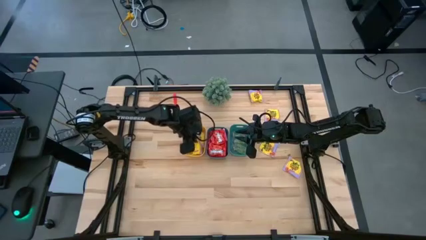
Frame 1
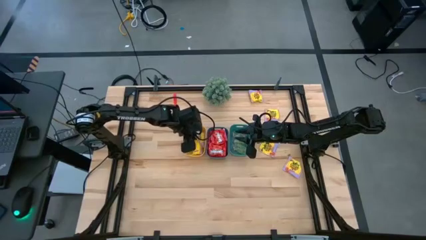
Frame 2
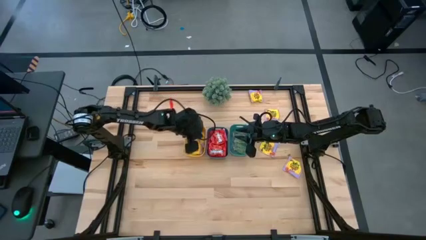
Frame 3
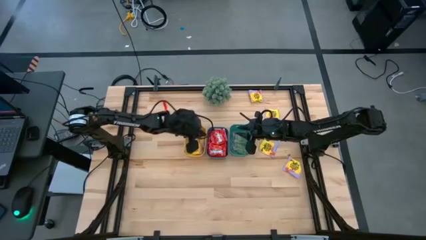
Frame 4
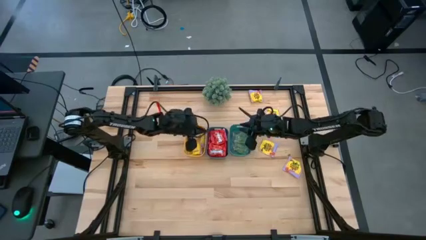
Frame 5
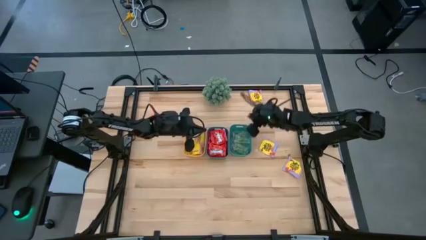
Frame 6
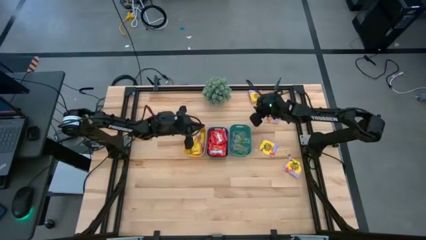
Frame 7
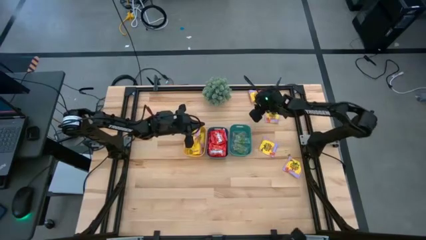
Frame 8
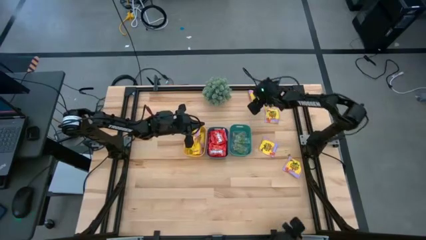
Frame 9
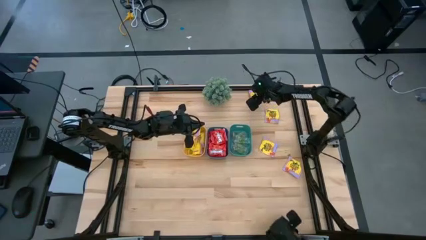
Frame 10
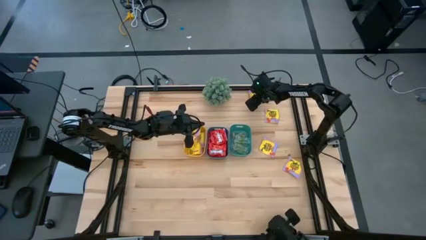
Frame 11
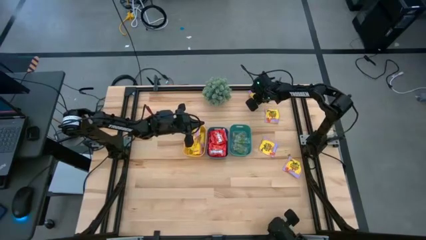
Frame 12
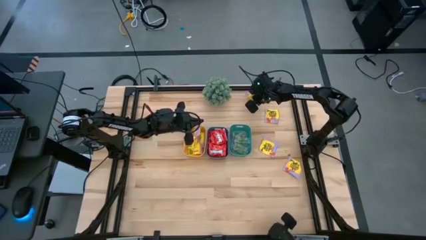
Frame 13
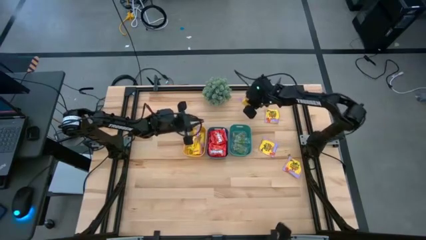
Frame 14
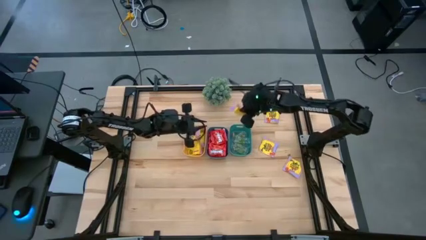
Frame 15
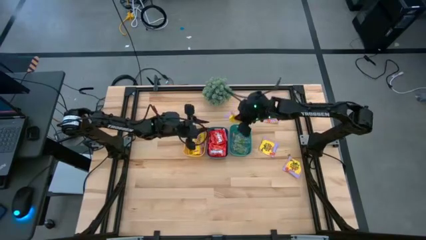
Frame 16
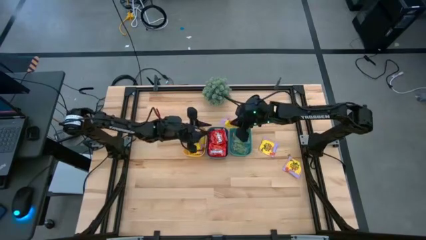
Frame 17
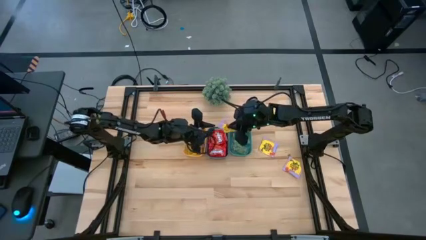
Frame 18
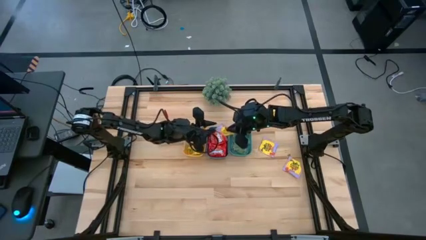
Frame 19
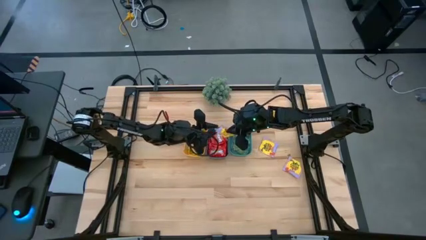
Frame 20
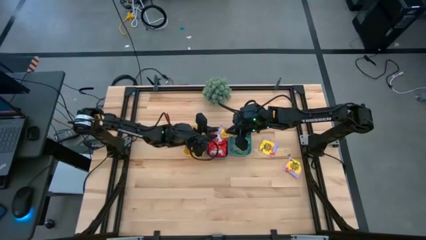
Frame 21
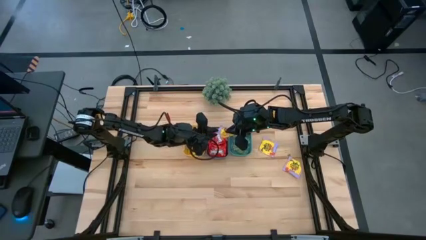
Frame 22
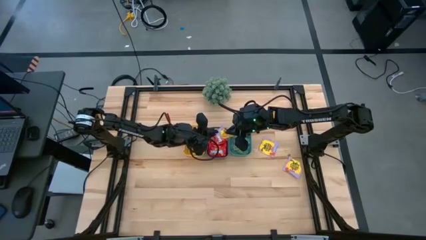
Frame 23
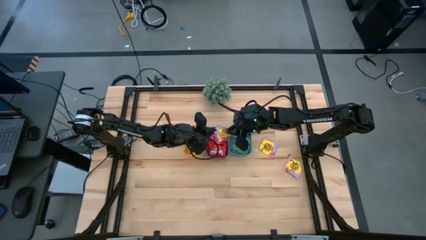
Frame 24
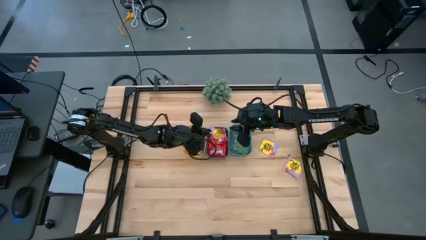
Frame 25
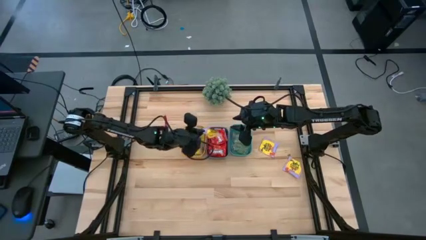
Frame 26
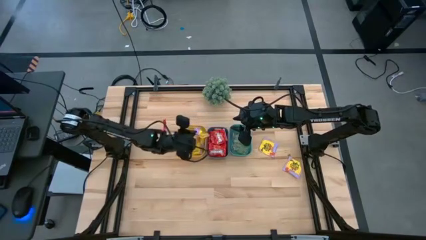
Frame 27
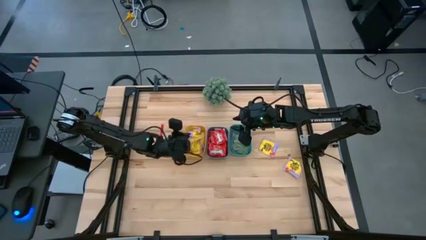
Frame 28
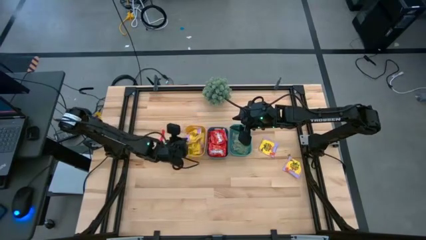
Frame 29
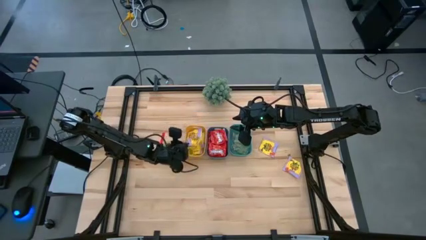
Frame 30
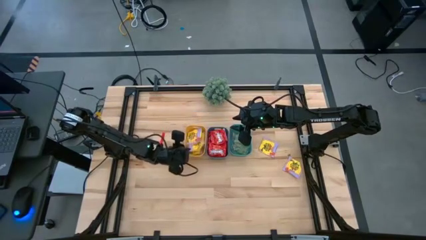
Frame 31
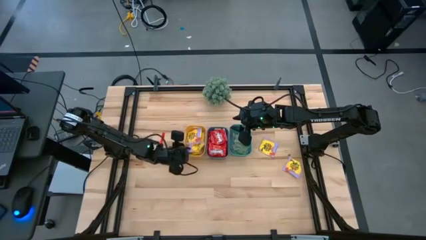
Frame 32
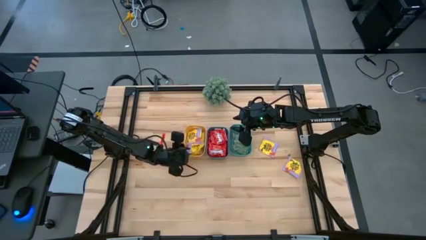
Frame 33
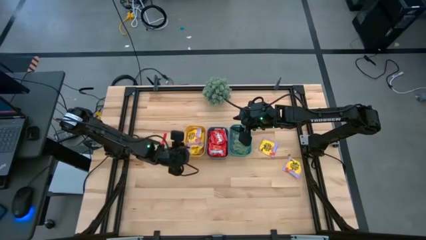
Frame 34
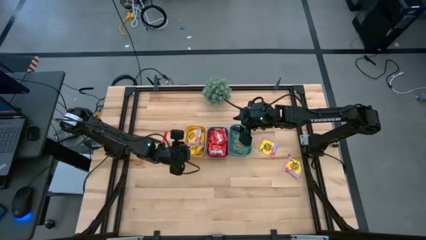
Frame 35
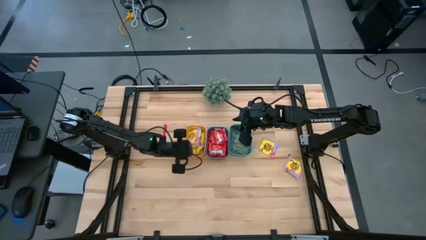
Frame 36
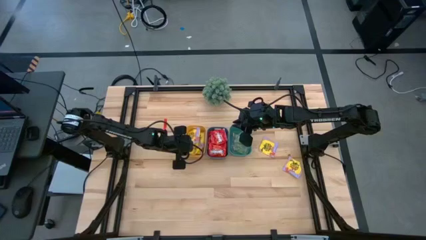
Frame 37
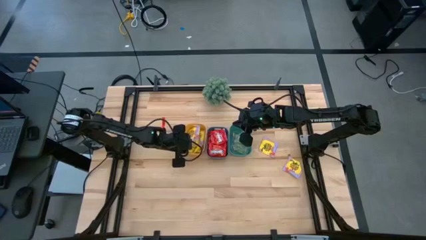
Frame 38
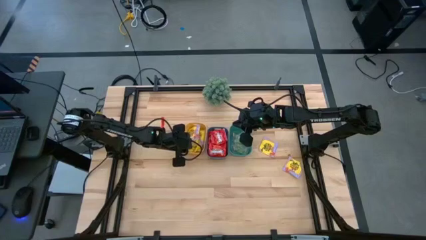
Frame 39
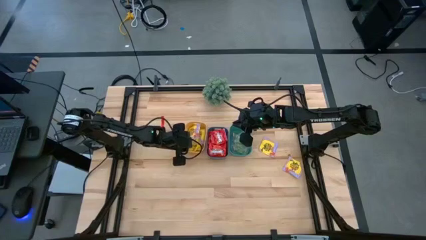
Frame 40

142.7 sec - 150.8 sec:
Task: Sort candy
Put the yellow candy pack into the yellow bin

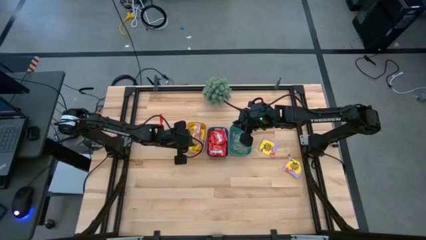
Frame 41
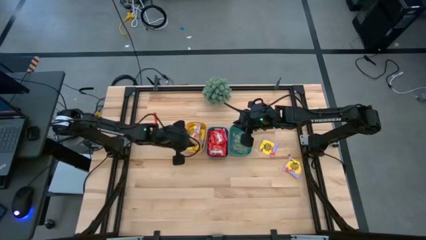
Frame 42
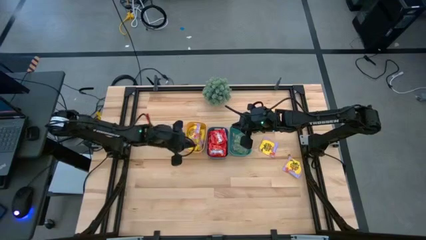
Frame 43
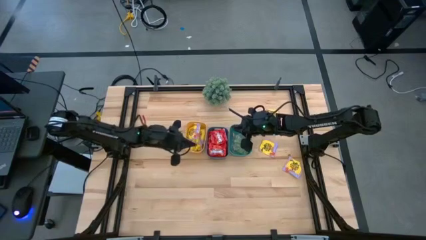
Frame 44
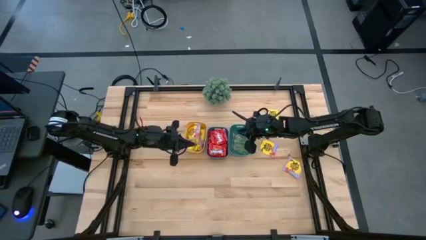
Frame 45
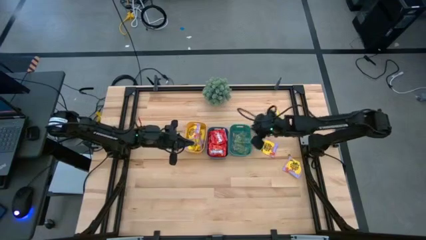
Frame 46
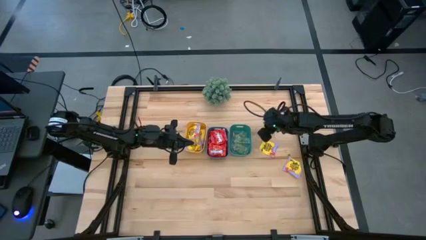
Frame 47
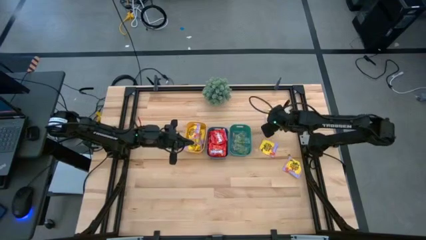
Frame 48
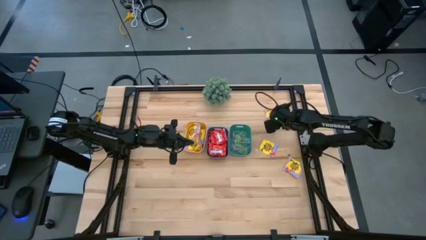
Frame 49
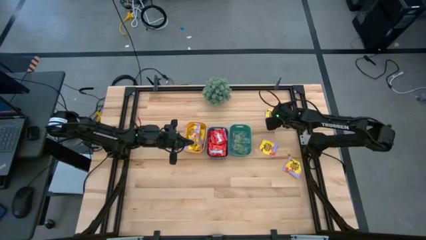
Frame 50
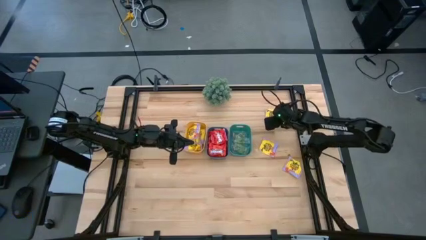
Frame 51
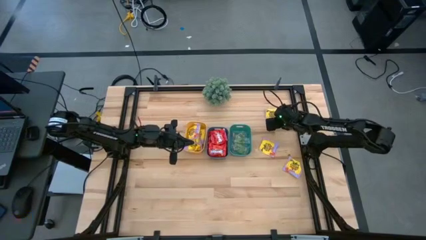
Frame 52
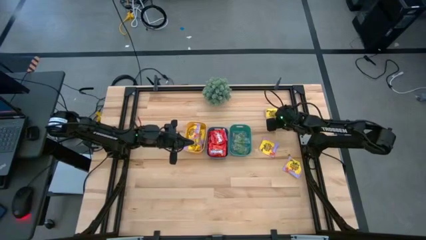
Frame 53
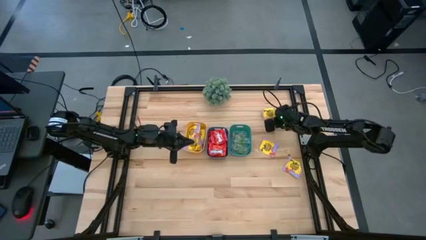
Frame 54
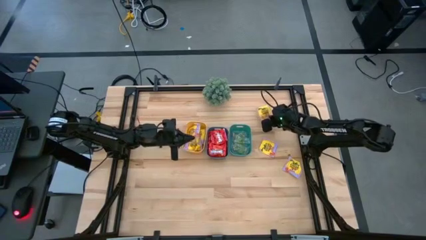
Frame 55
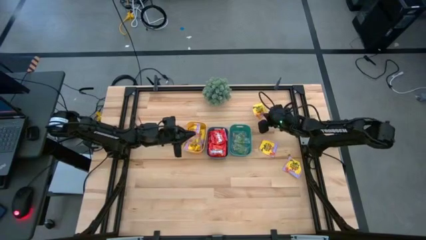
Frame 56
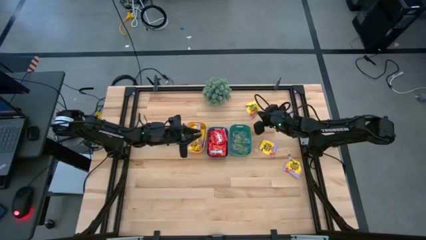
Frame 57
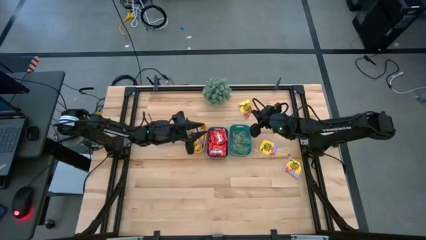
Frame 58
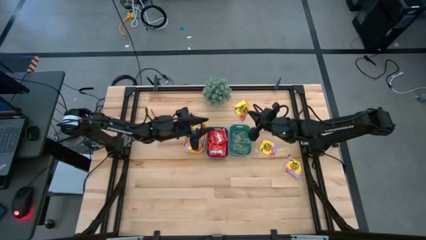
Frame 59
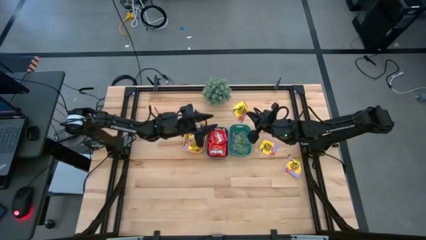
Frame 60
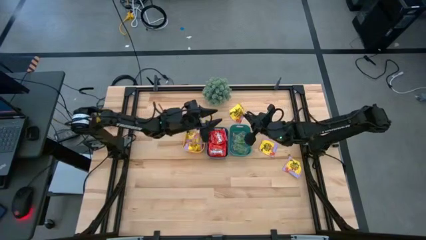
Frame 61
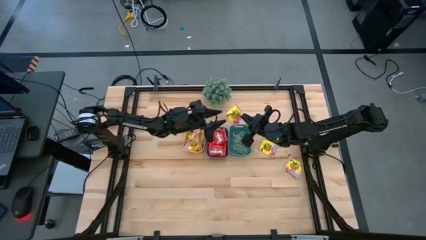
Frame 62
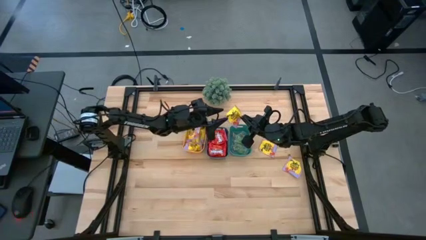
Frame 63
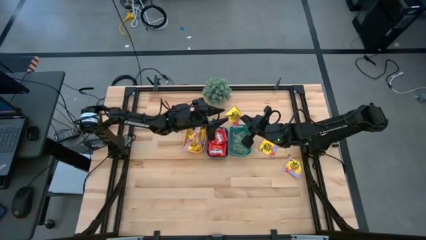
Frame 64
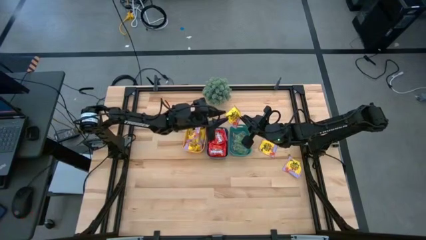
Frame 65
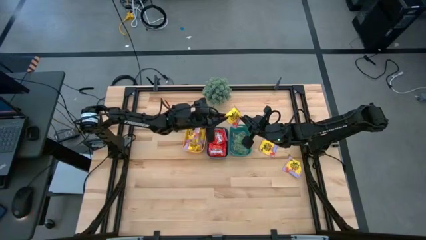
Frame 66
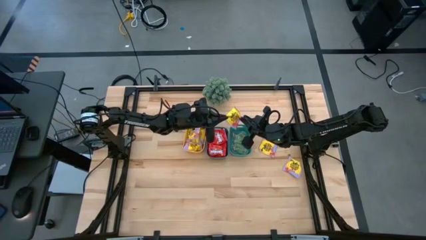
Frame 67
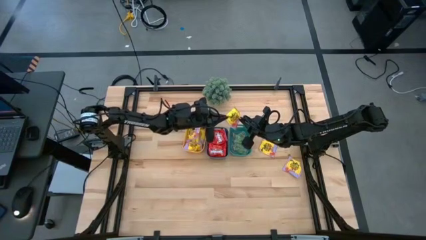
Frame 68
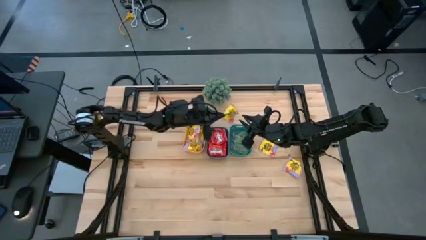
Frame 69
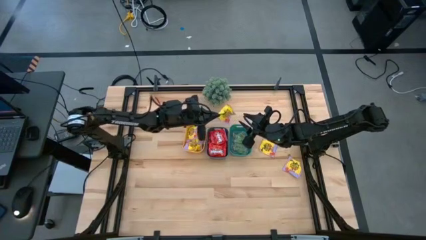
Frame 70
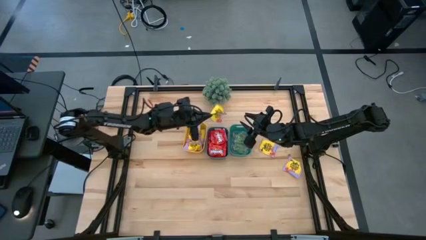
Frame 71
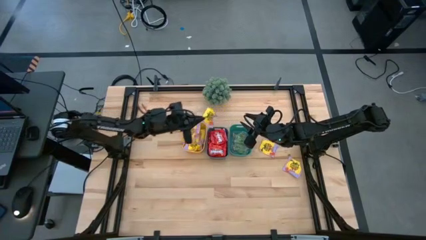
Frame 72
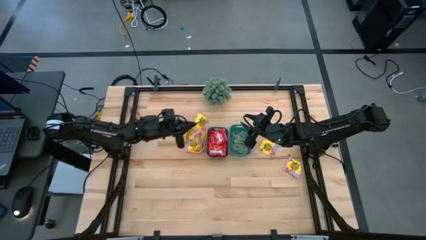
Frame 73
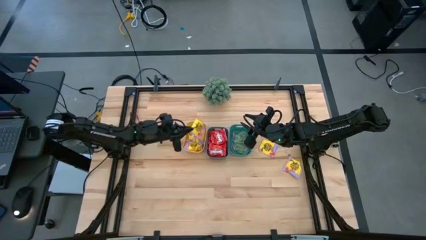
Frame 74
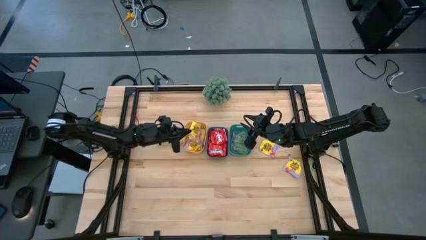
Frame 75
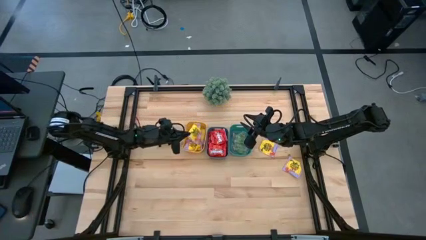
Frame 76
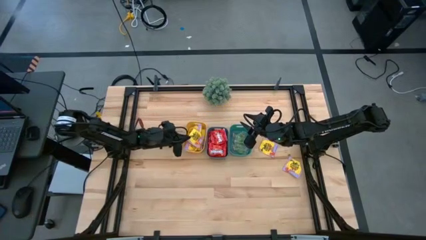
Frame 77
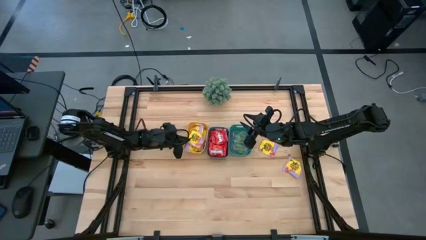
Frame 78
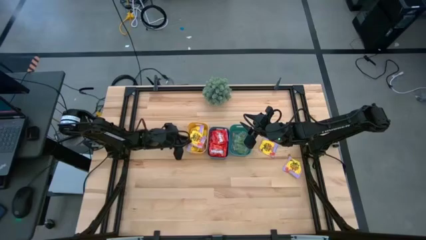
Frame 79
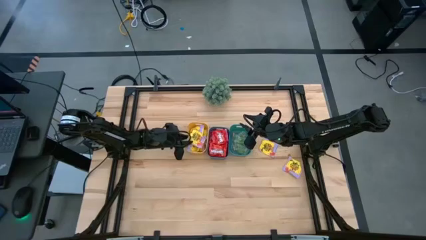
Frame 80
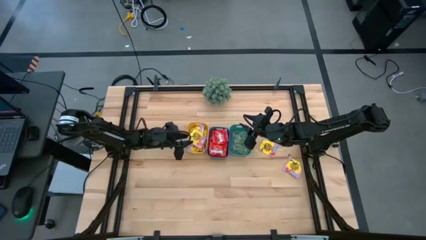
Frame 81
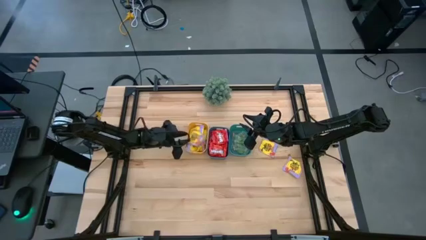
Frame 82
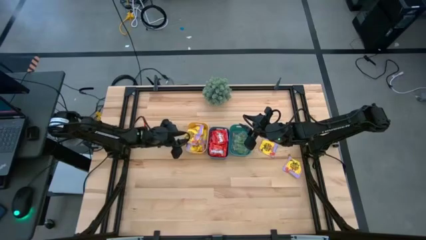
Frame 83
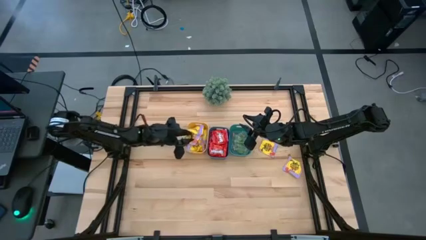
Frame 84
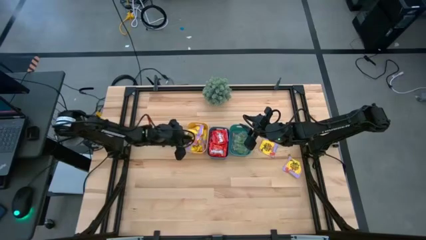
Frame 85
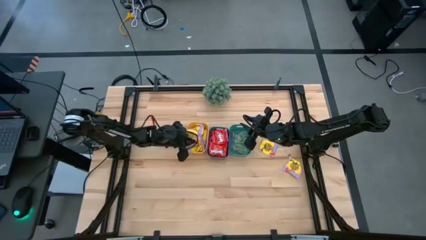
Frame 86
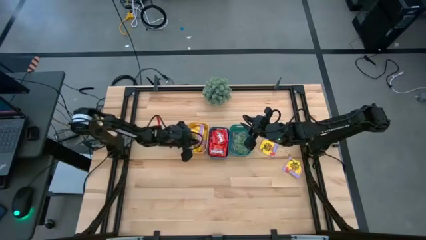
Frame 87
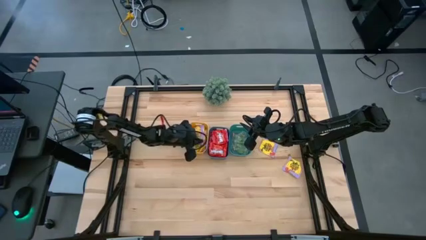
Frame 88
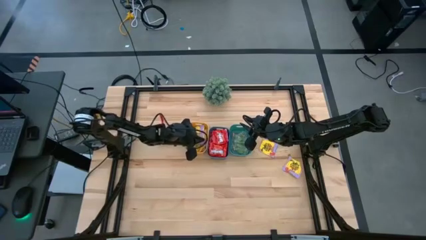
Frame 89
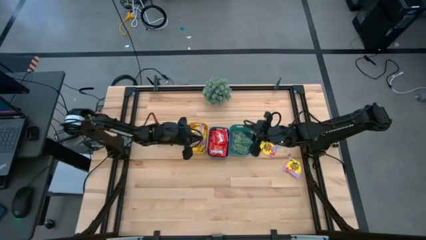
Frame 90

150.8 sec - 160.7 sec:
Put the yellow candy pack into the yellow bin
